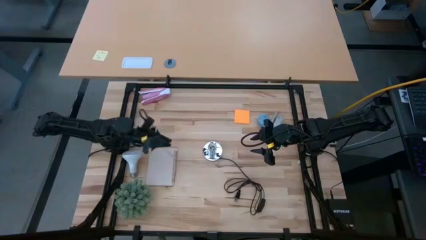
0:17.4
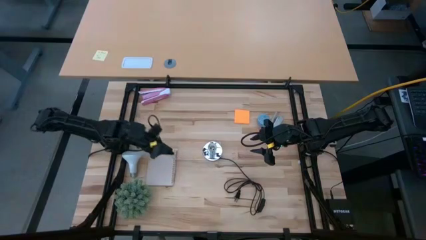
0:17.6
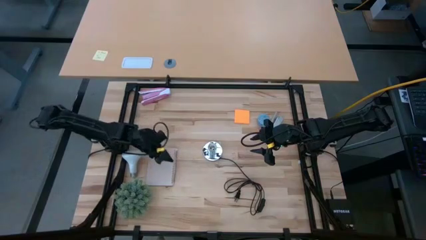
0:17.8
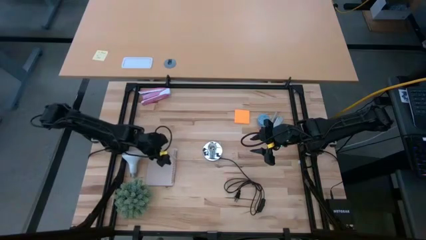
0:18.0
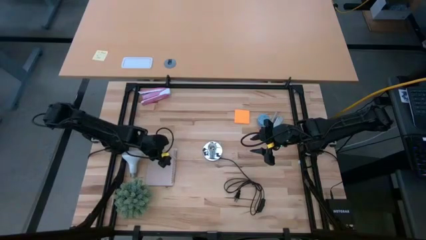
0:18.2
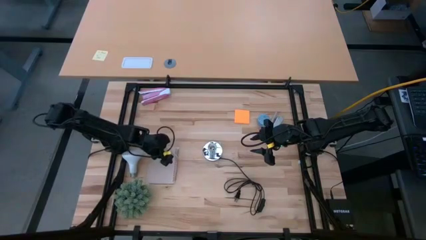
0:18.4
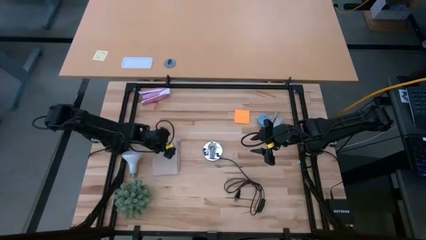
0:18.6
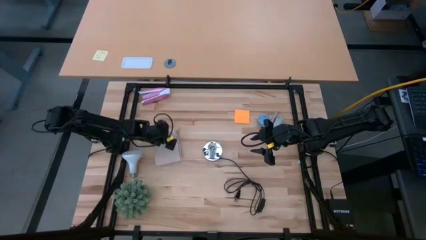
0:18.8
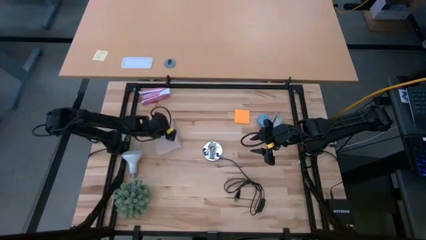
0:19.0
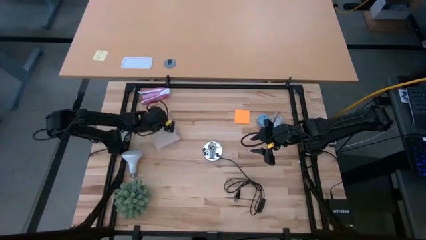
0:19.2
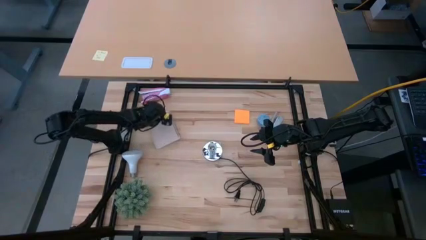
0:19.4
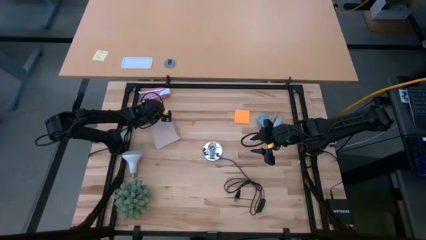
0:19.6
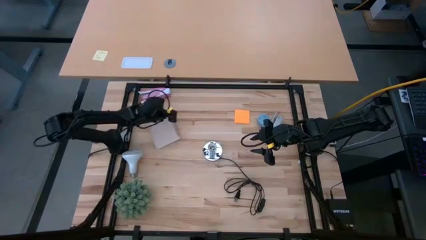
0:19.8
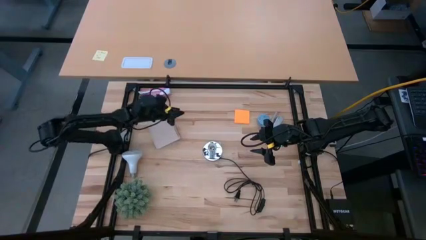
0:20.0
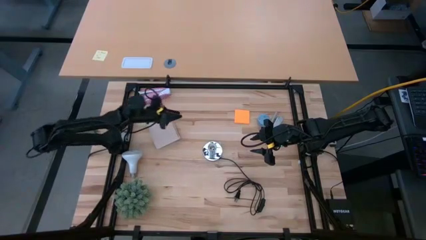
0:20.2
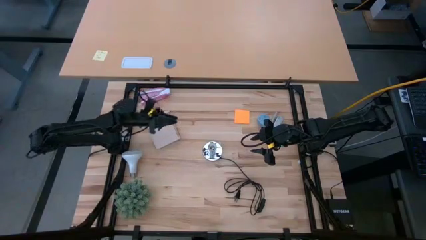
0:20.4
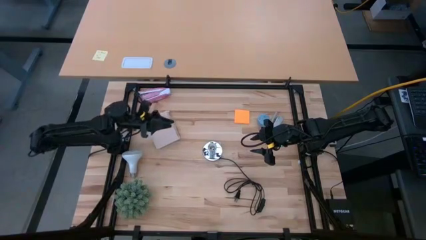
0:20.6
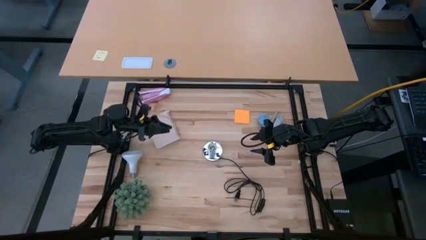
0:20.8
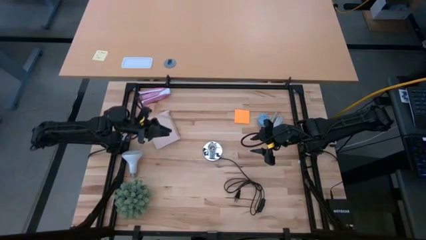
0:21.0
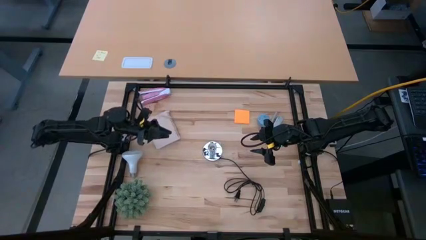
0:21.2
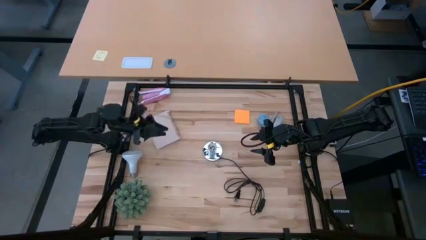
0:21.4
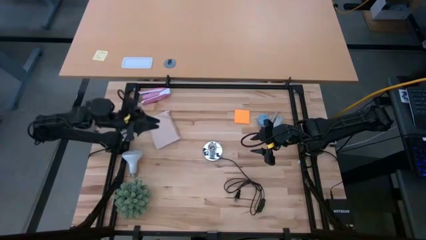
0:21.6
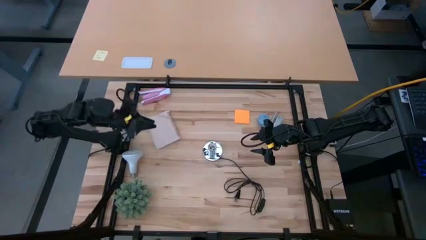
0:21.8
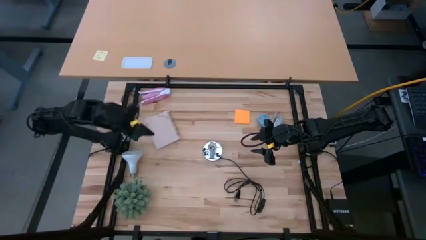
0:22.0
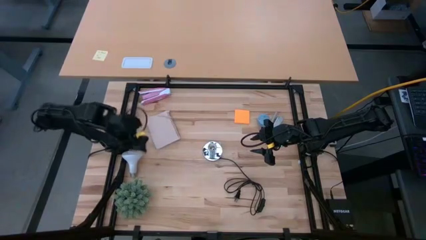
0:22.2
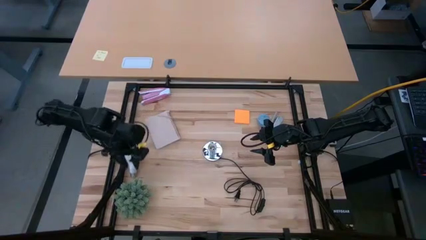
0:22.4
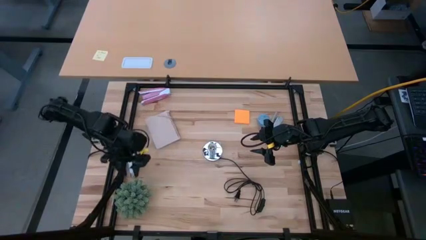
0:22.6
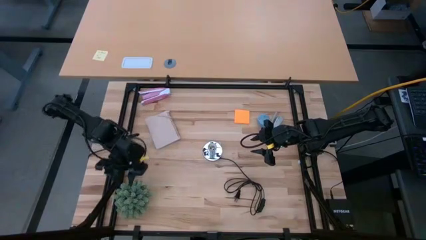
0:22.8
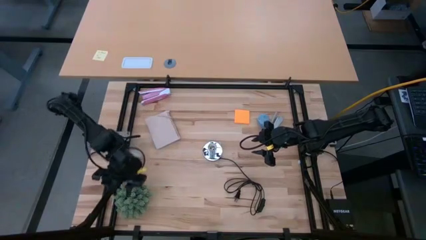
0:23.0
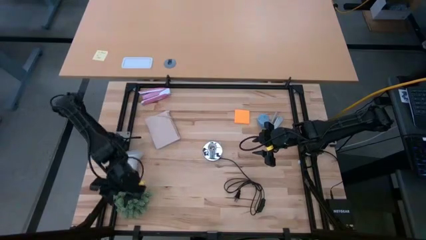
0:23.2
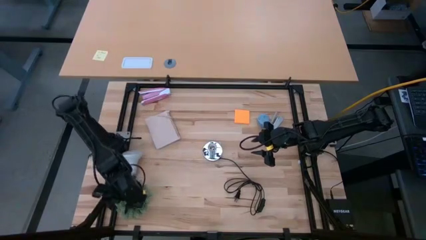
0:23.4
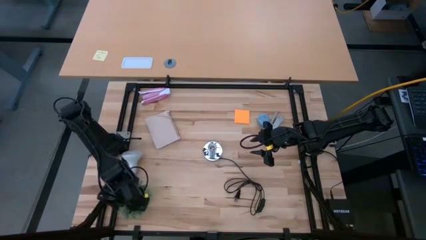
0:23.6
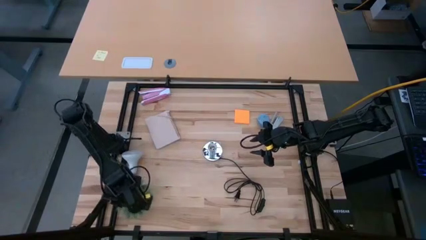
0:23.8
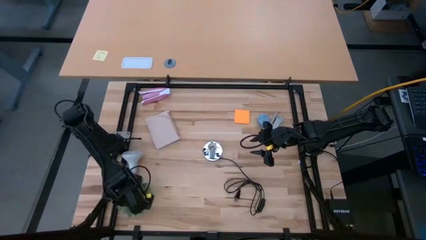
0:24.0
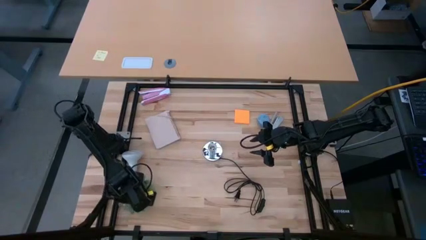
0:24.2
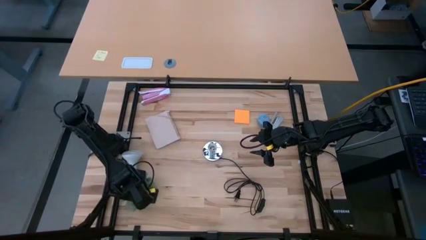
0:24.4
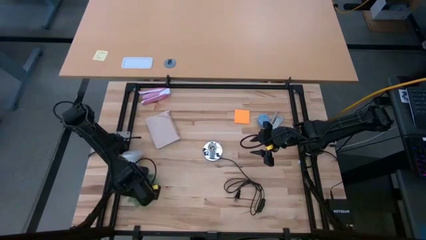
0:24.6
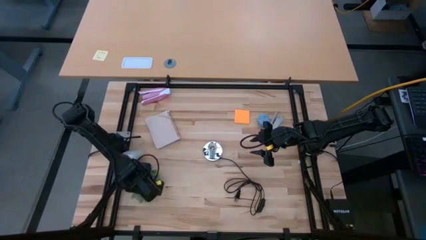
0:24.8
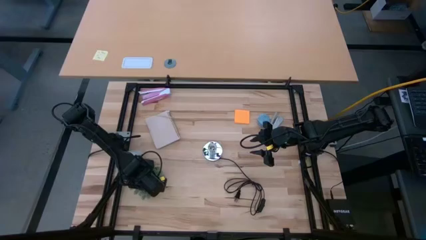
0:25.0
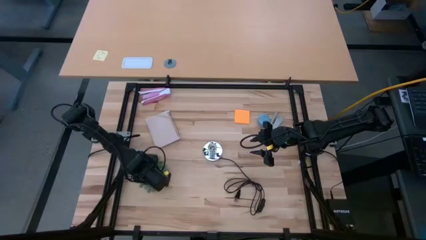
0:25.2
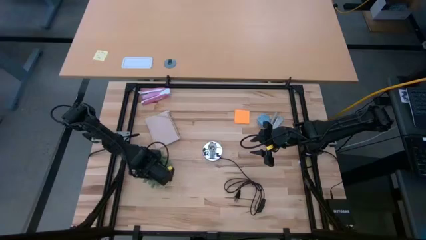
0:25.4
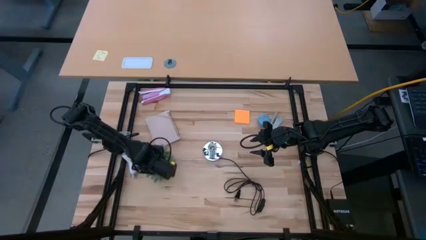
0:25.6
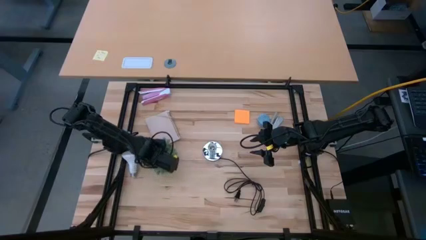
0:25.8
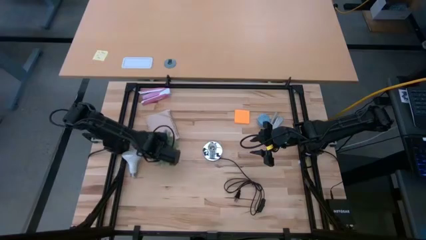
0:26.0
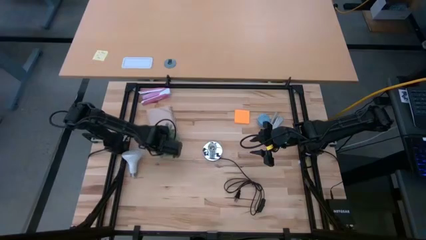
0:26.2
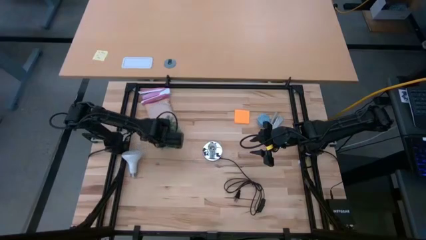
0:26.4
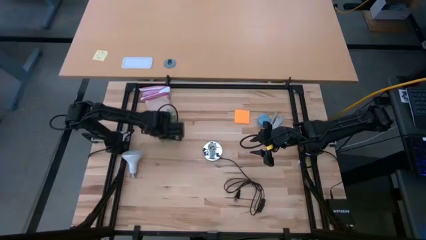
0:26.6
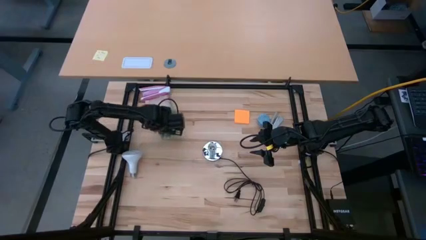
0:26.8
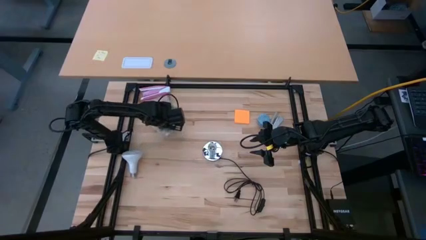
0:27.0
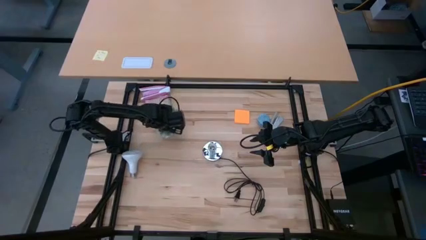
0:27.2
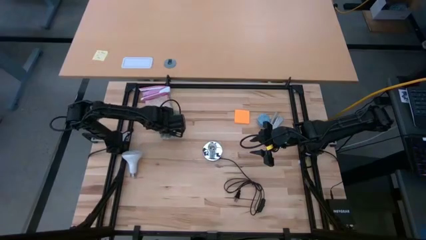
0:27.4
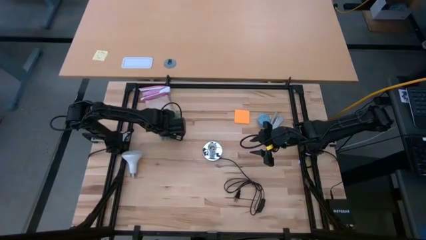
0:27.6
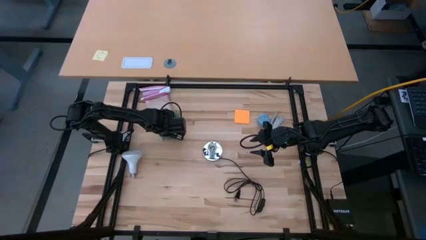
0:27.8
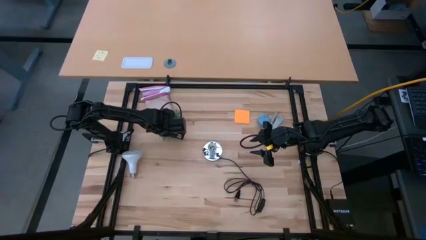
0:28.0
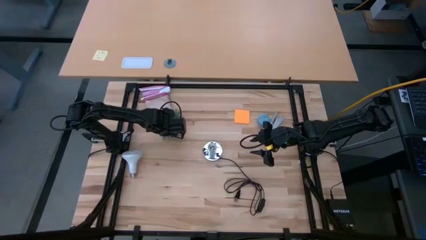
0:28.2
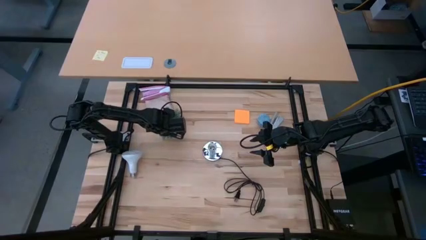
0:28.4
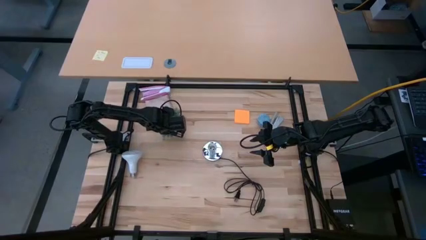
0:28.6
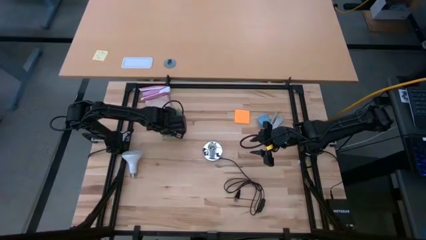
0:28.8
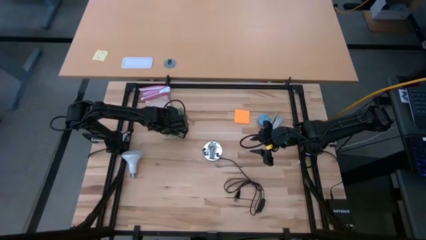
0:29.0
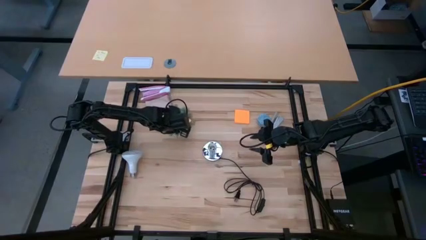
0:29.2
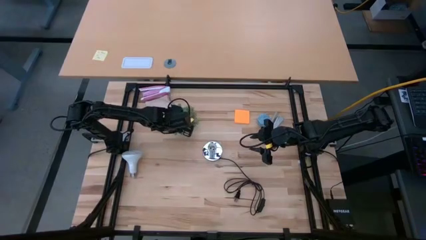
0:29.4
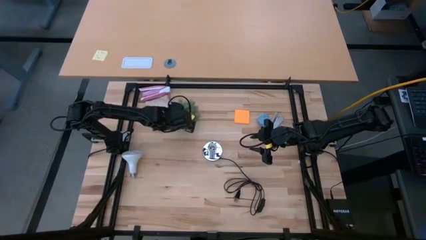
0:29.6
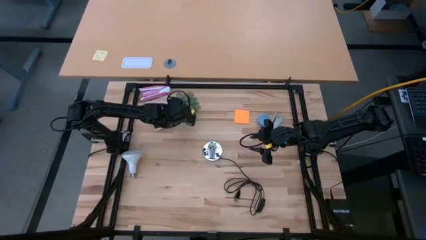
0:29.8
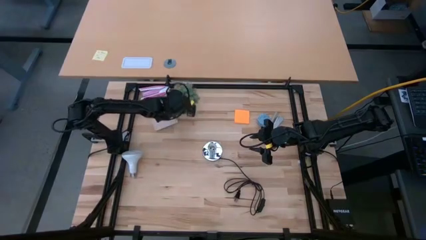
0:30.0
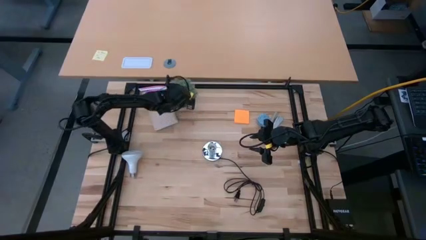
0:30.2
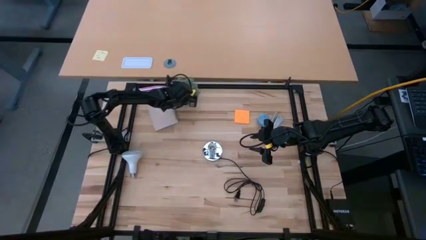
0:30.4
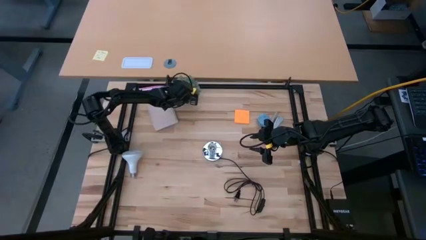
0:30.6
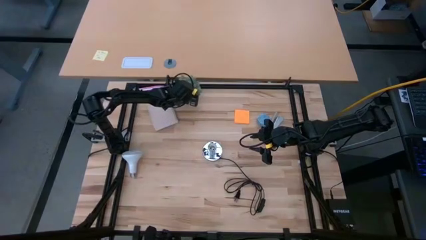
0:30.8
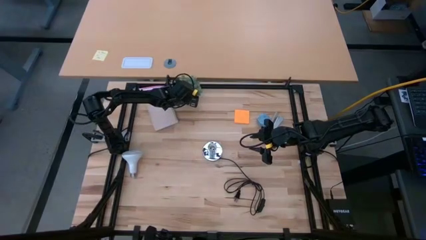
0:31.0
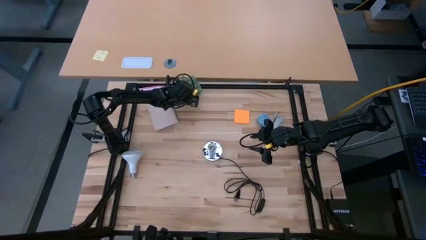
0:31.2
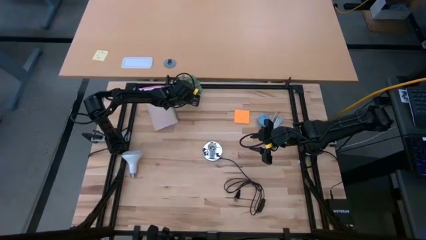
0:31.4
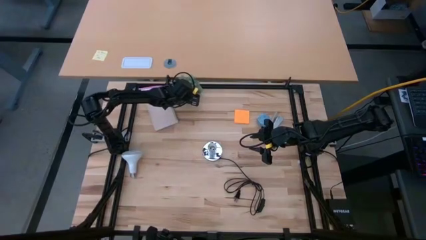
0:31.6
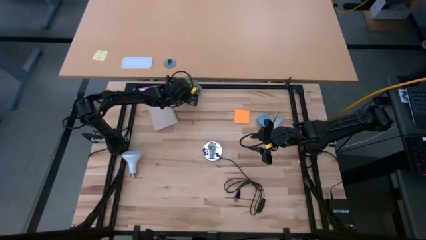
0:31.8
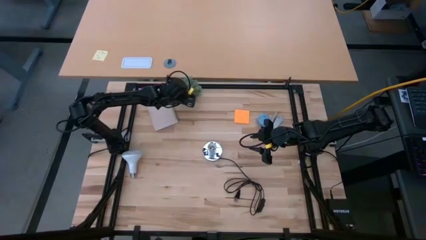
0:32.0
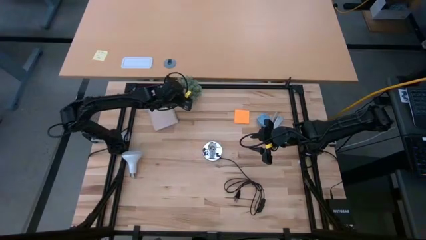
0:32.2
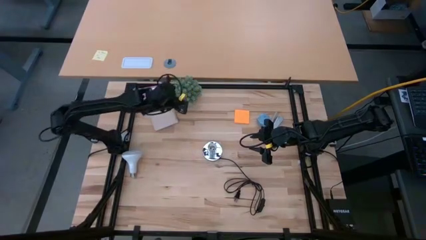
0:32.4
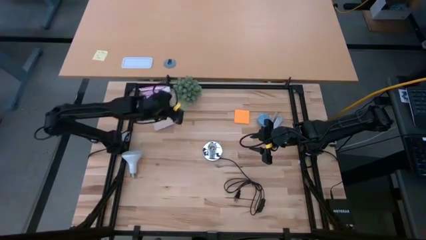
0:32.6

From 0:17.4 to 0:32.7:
Task: Screw lightbulb
Move the potted plant on top of the table

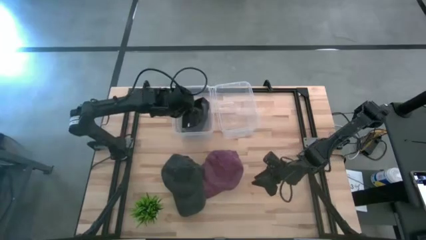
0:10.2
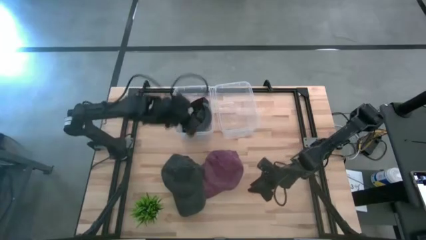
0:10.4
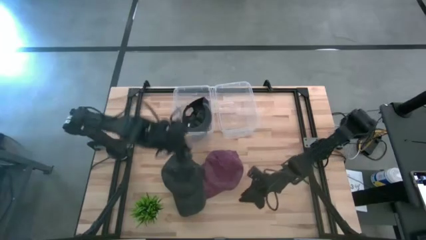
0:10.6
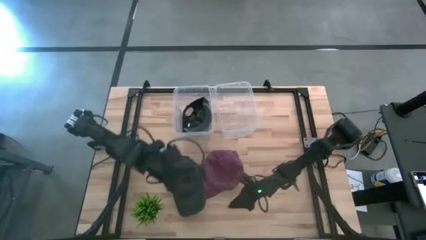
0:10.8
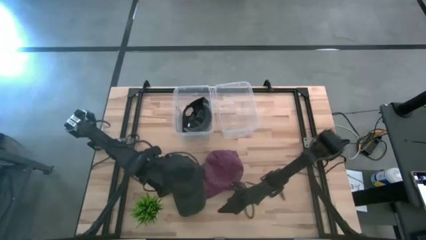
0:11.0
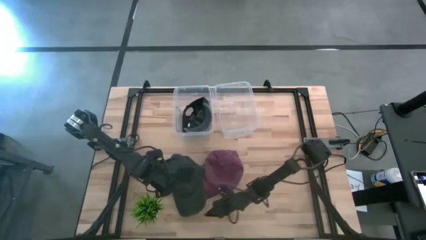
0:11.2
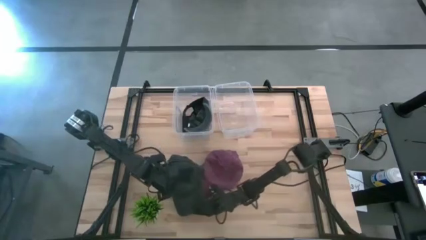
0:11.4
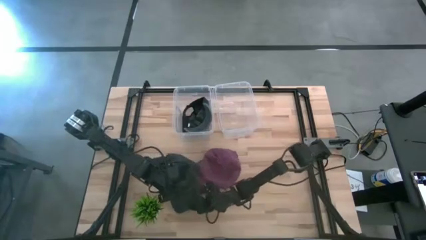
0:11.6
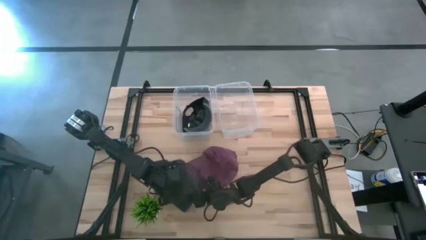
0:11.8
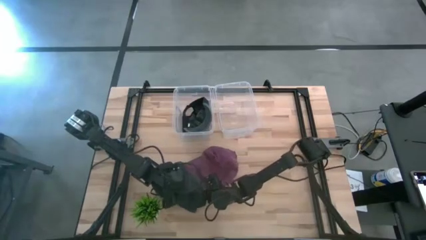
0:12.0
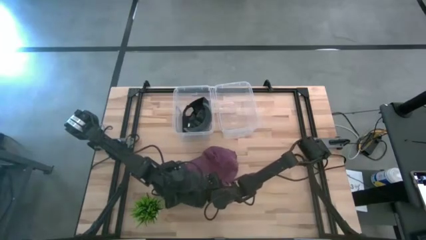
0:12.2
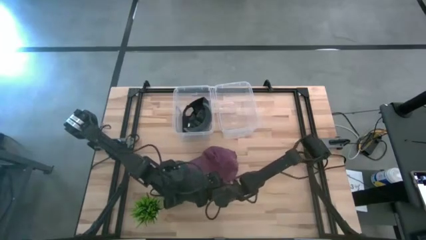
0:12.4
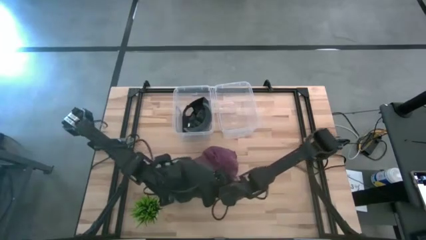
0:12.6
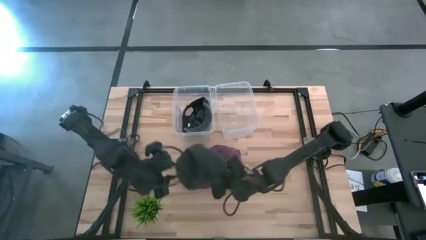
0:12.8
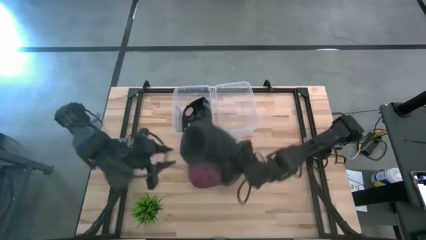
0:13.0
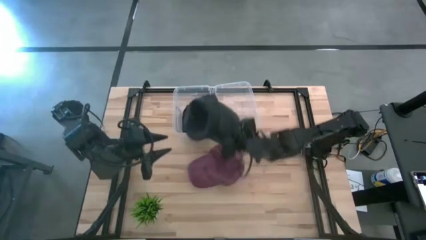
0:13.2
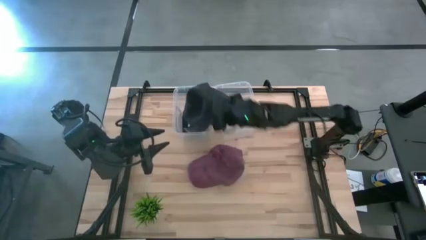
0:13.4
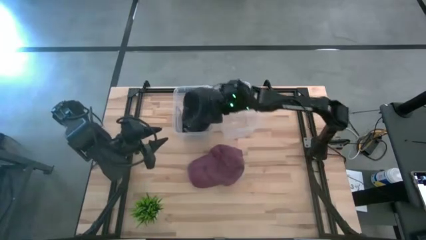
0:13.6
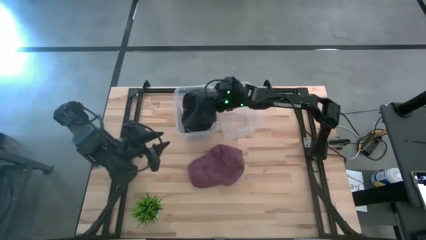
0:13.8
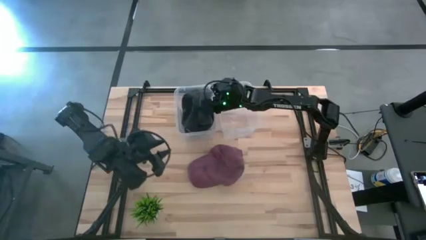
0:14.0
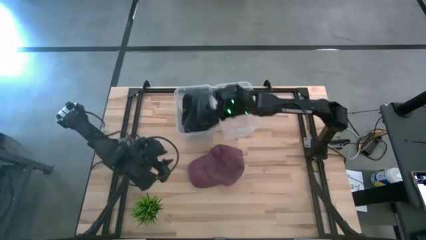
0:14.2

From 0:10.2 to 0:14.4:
Task: Pick & Place hat
Put the black cap into the left transparent bin
